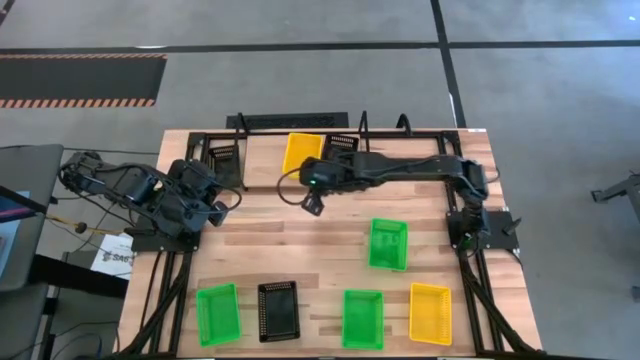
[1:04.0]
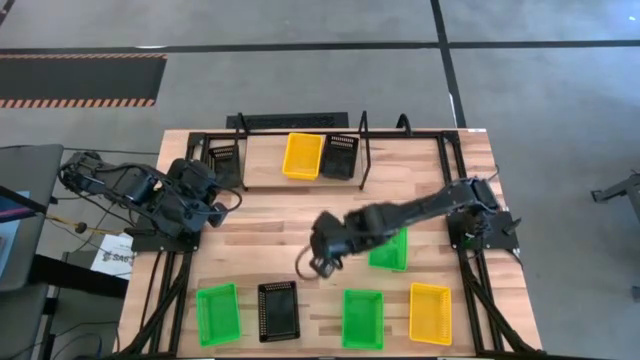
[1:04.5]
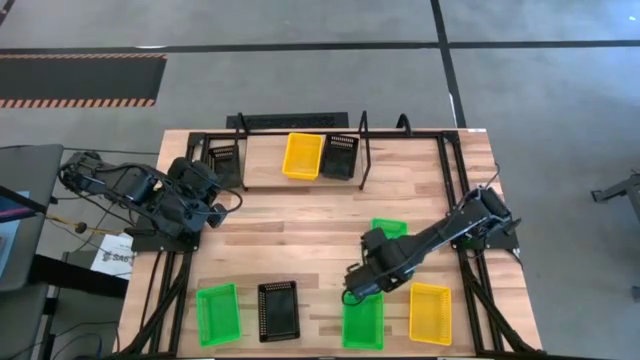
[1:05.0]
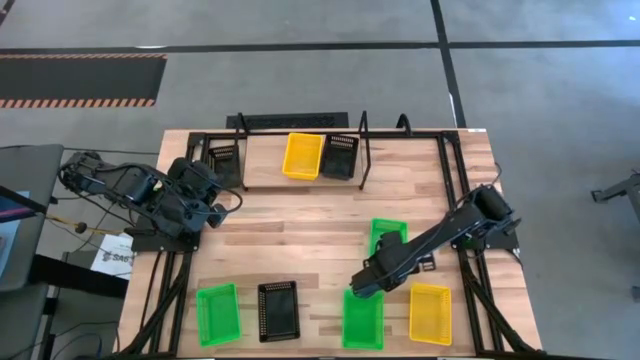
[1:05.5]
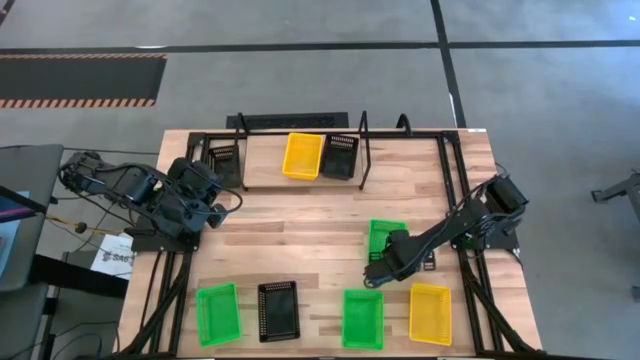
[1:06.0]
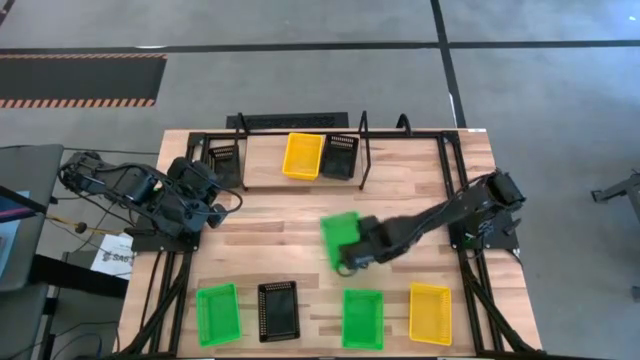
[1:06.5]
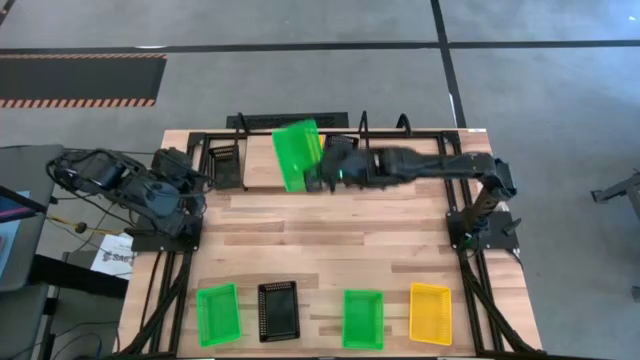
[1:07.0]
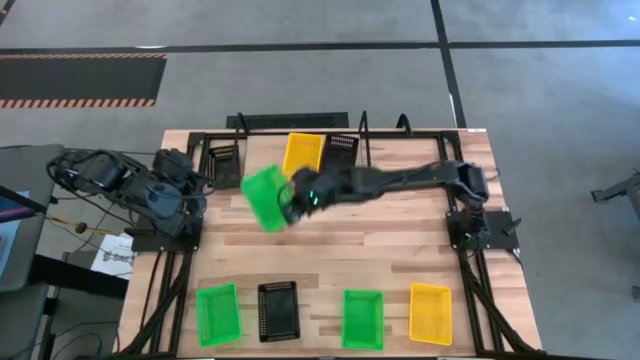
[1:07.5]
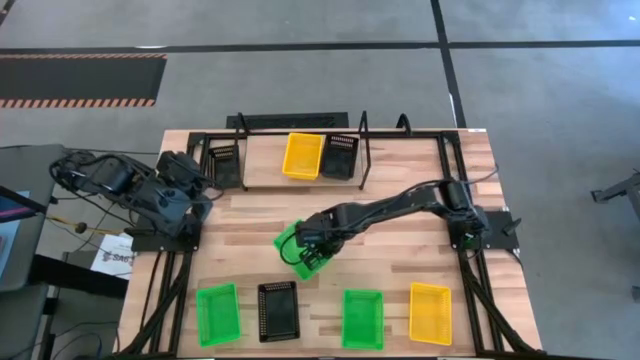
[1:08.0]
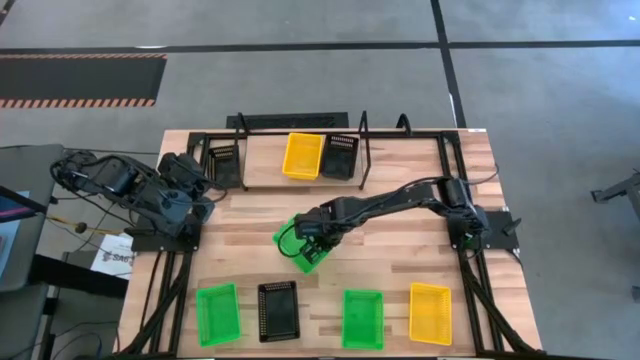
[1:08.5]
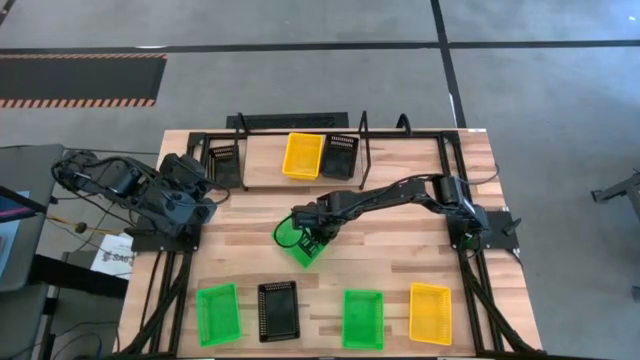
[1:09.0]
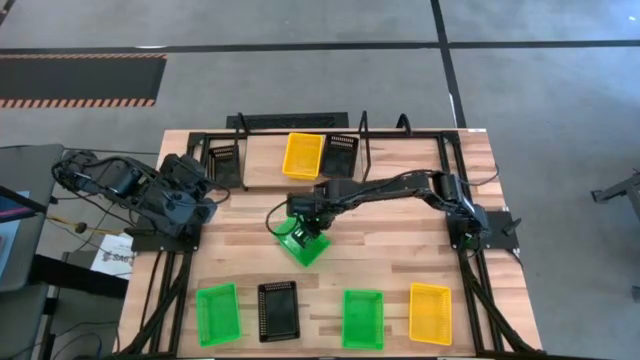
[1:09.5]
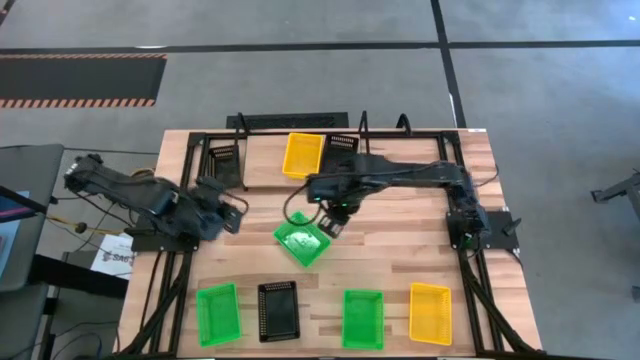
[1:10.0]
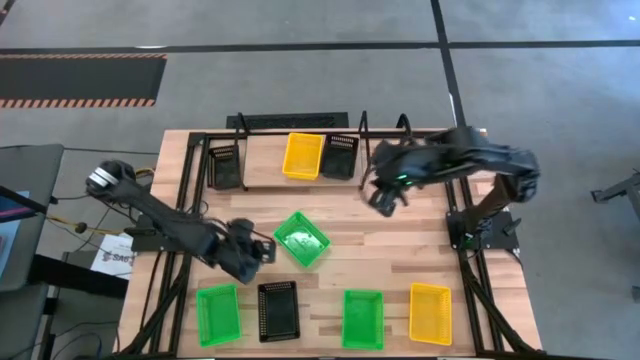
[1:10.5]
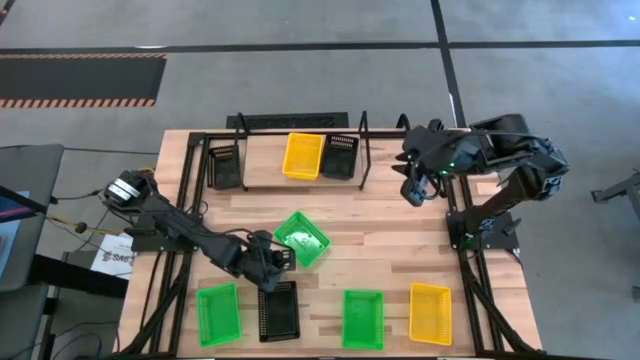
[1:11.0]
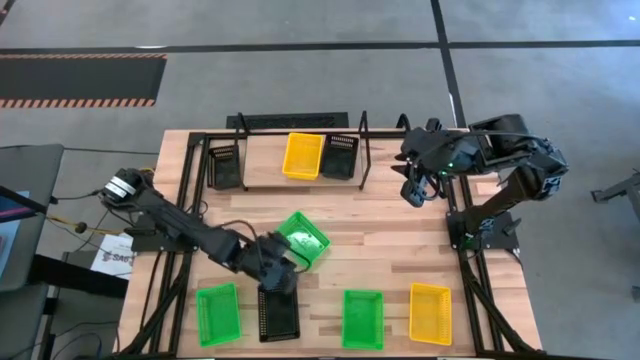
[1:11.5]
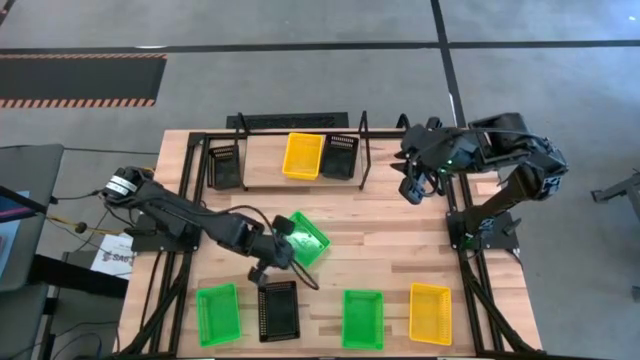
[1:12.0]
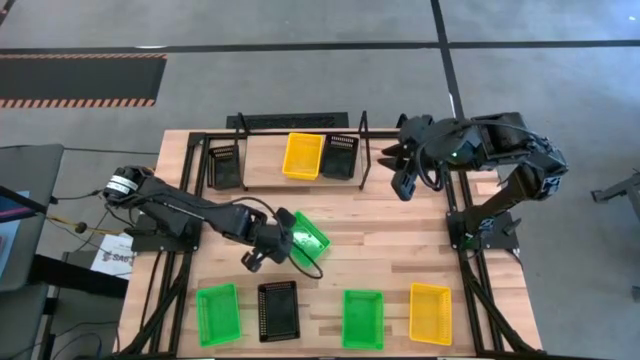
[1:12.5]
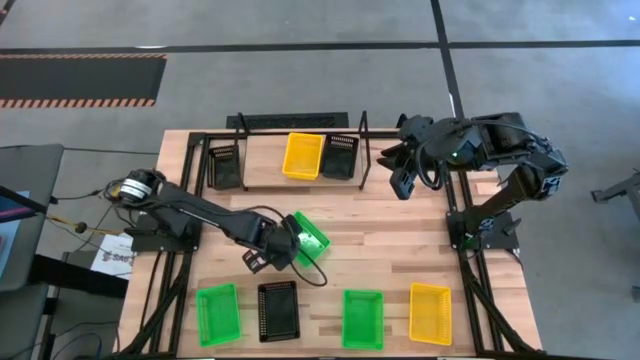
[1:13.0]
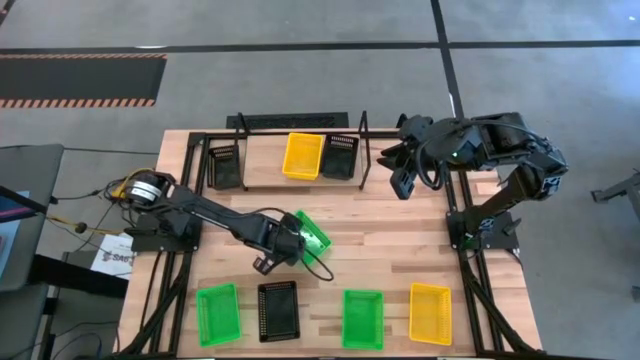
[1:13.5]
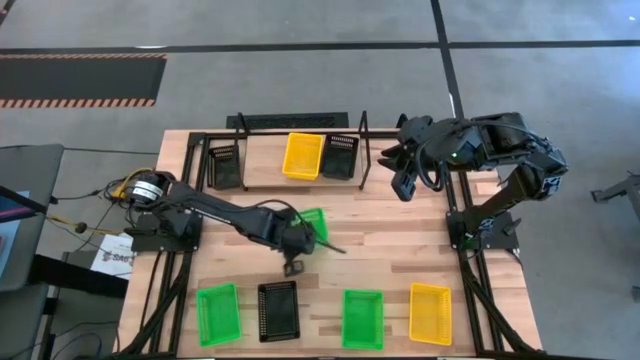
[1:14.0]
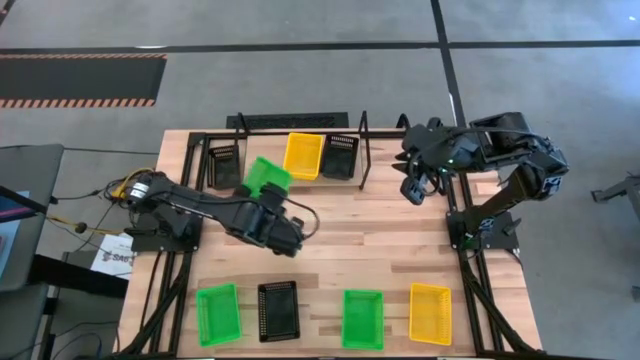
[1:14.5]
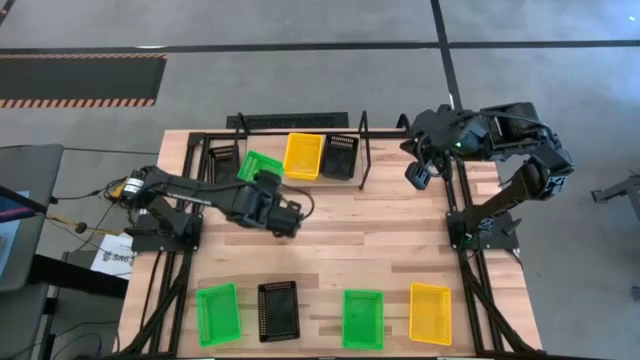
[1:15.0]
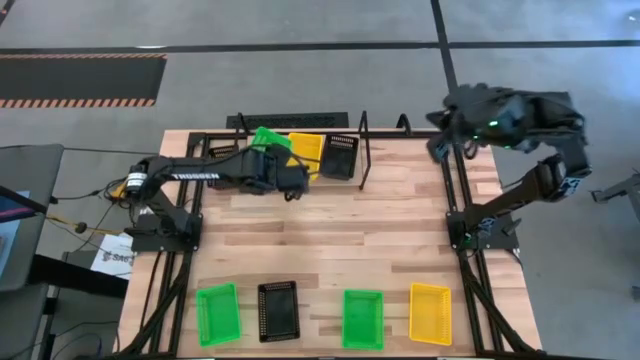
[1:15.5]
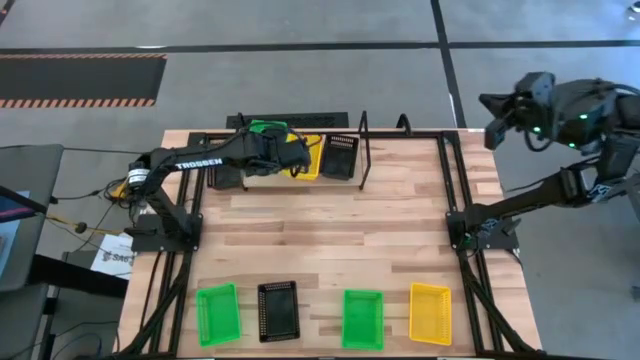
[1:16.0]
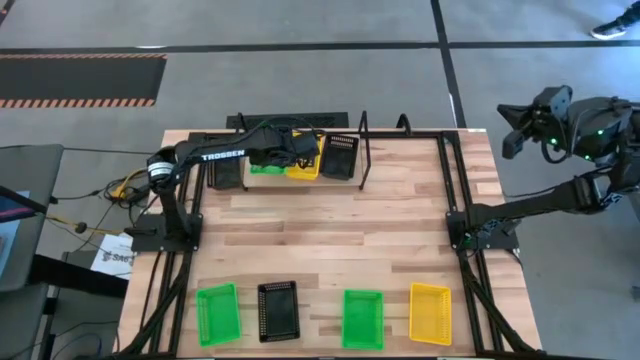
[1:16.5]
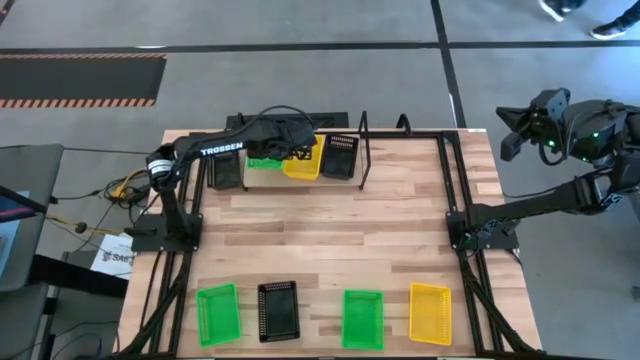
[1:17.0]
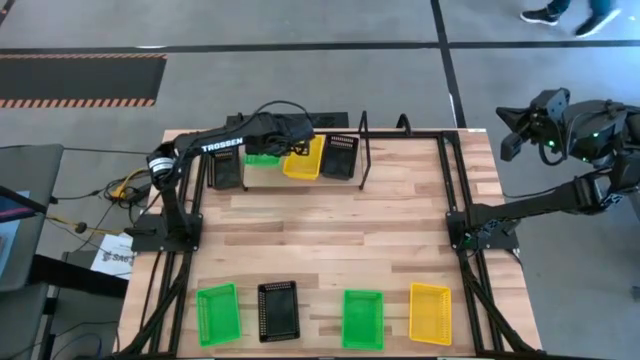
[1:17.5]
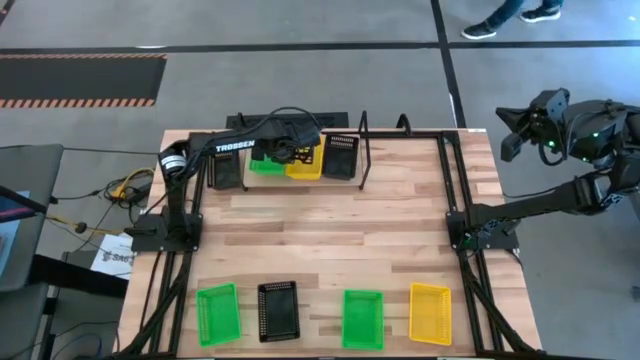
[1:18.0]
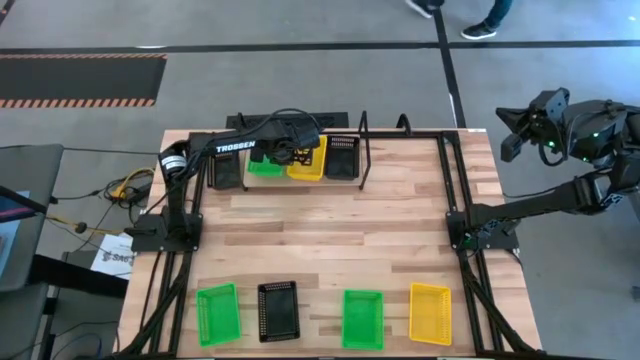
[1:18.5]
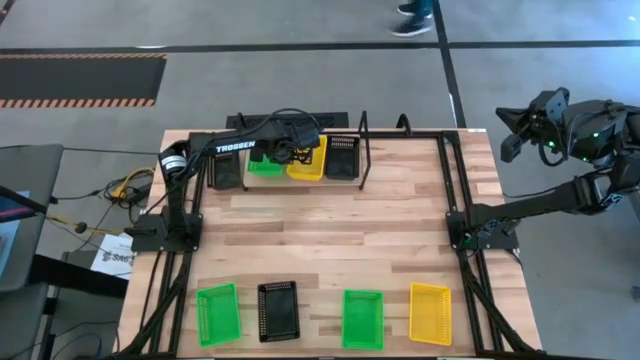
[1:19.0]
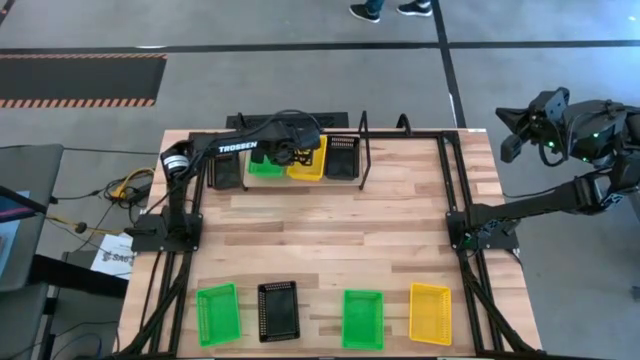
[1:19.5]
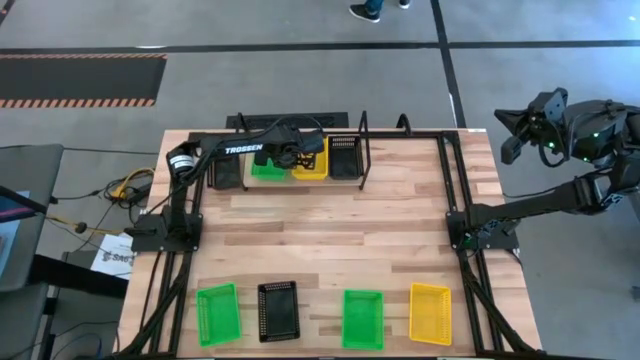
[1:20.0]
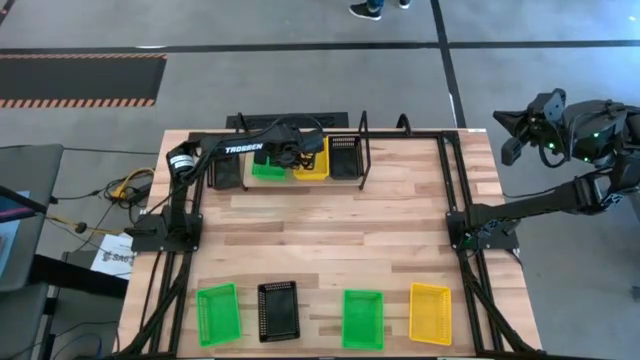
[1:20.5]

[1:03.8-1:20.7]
Task: Stack baskets on shelf by color
Put the top right green bin on the shelf

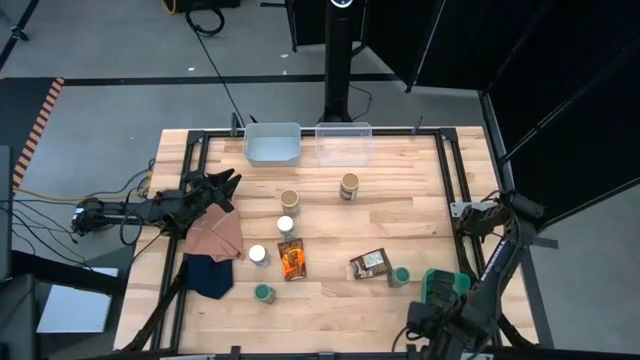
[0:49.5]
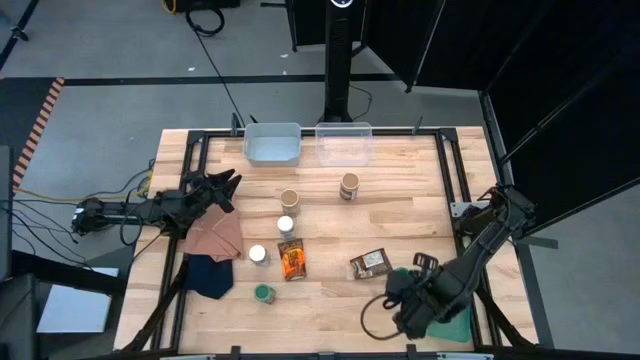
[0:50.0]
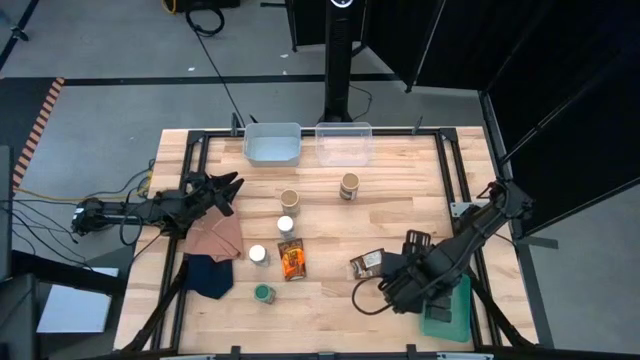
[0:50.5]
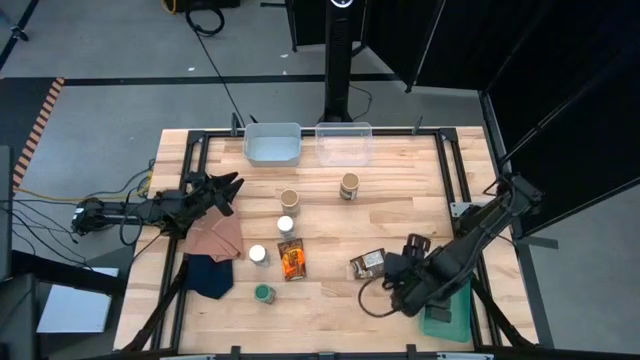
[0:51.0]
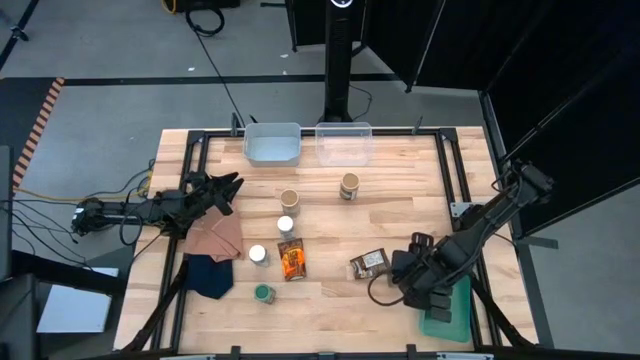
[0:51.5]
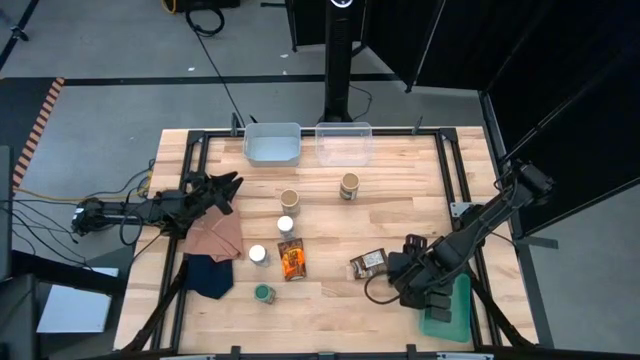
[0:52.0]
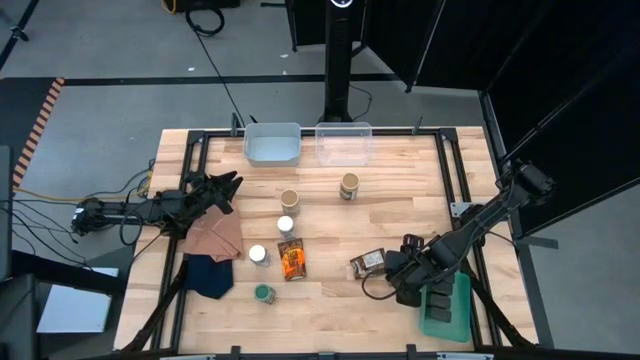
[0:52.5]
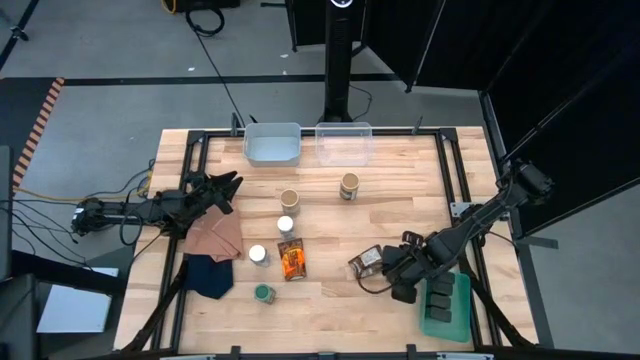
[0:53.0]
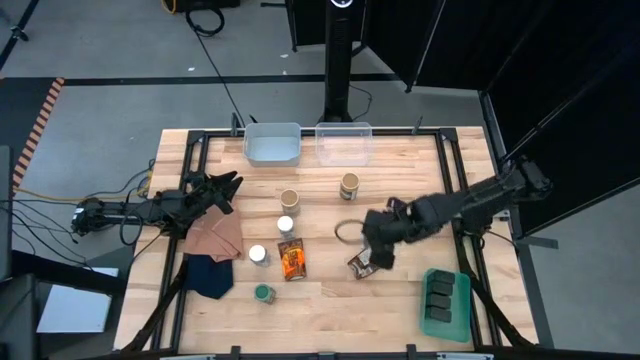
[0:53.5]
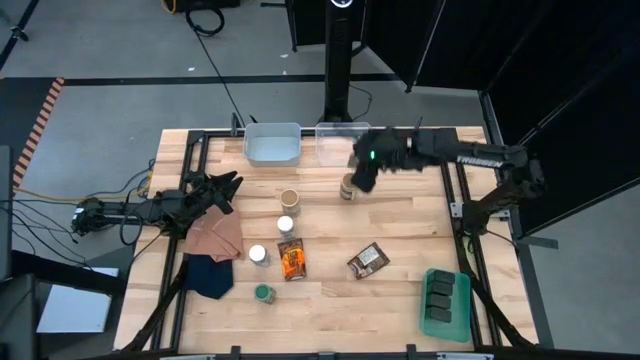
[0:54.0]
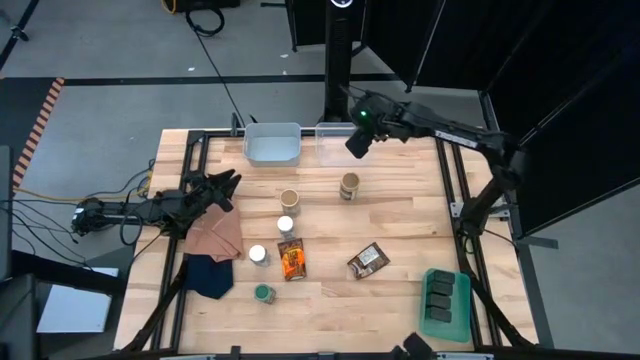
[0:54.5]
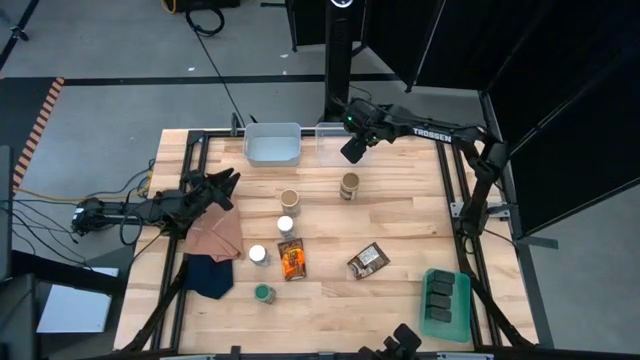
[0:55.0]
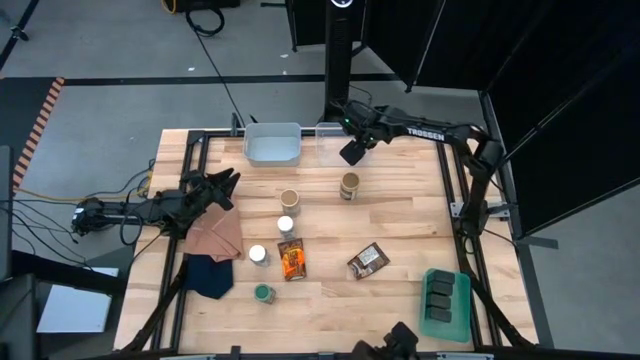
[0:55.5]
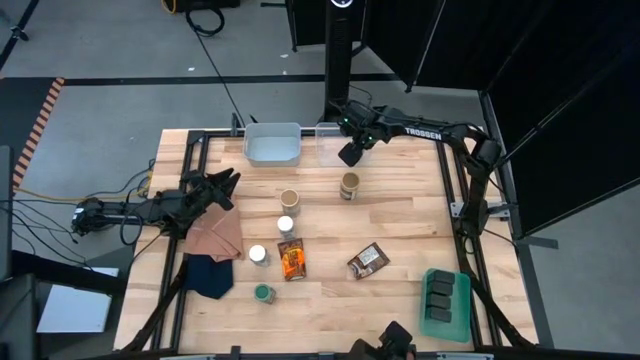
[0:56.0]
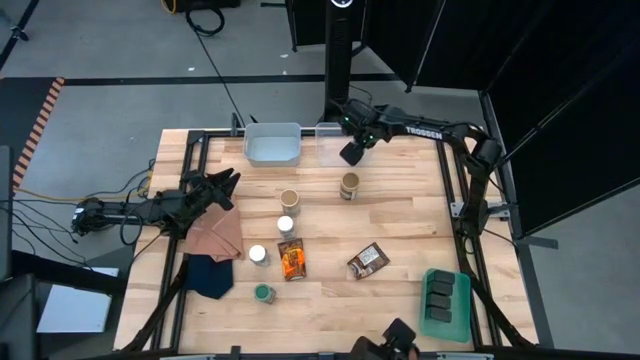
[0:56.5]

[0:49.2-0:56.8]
Task: Sort spices by type
Put the right green seasoning bottle into the transparent bin
